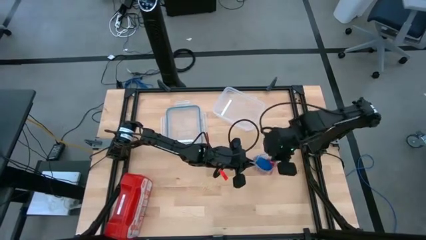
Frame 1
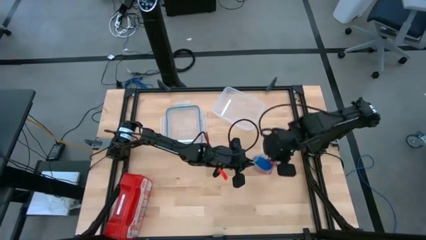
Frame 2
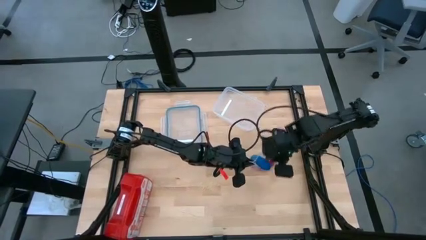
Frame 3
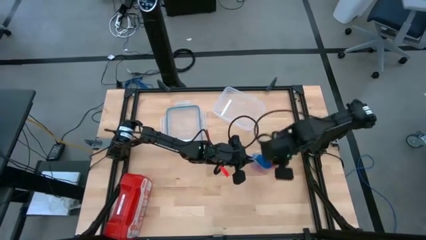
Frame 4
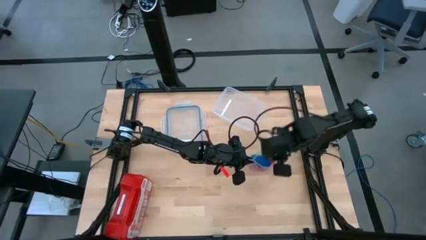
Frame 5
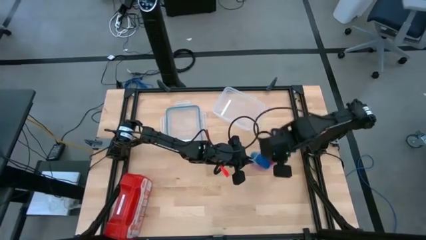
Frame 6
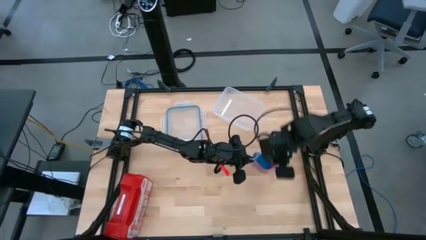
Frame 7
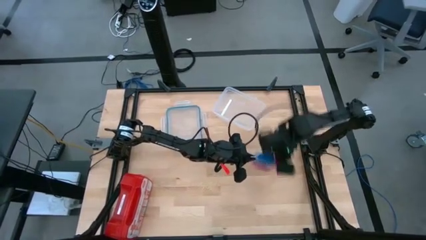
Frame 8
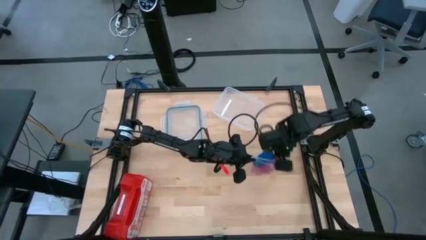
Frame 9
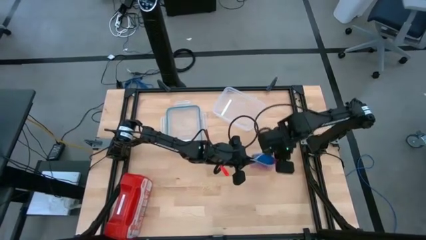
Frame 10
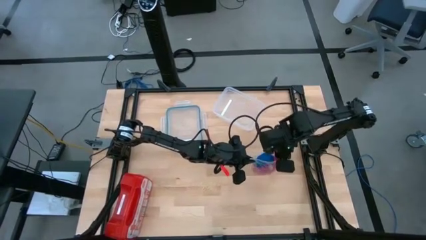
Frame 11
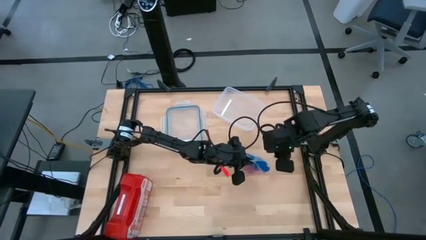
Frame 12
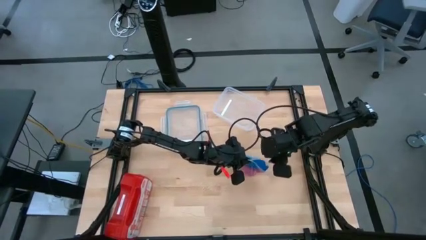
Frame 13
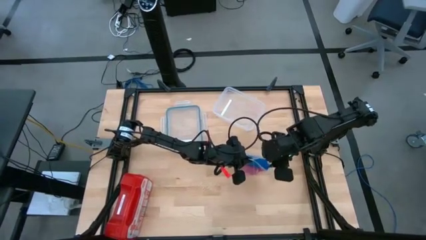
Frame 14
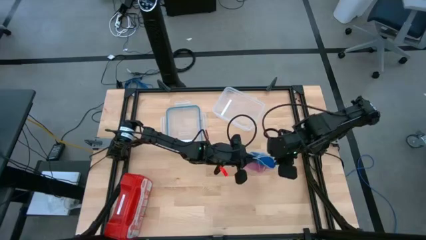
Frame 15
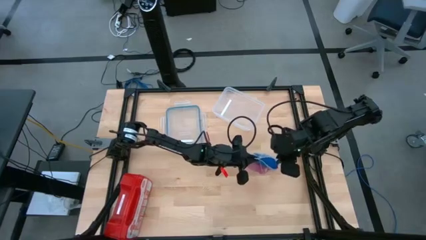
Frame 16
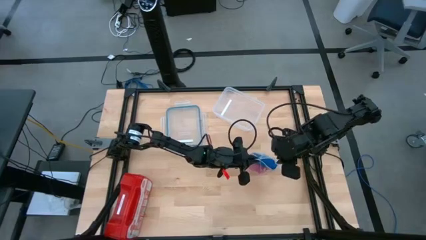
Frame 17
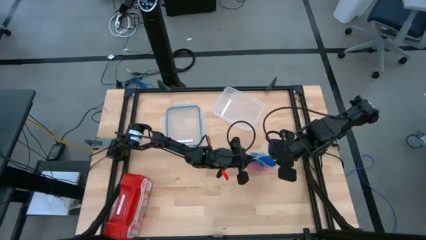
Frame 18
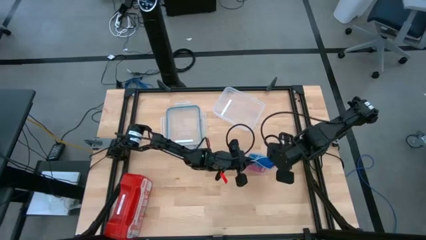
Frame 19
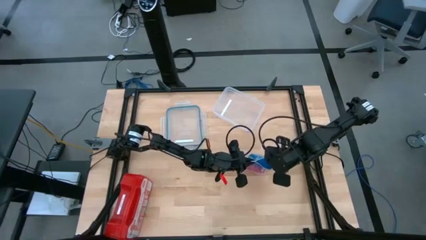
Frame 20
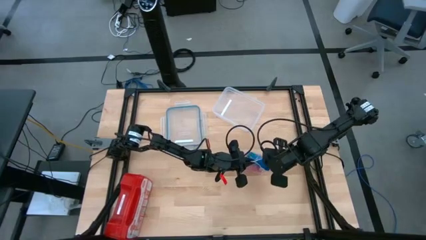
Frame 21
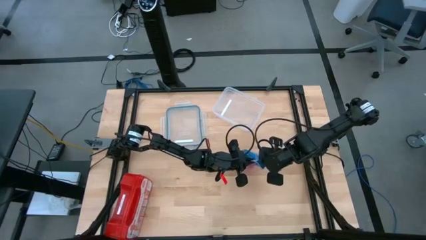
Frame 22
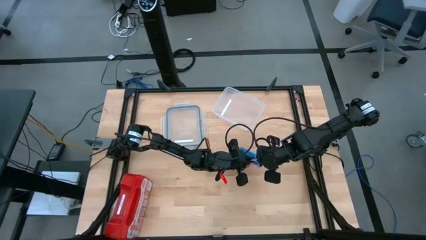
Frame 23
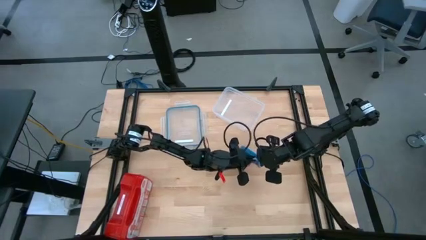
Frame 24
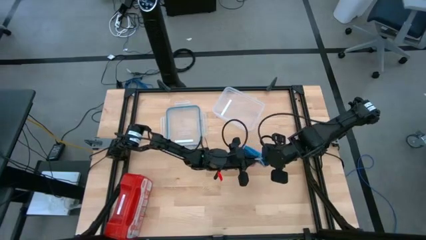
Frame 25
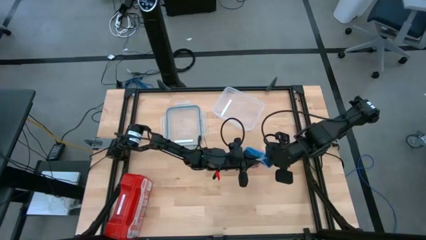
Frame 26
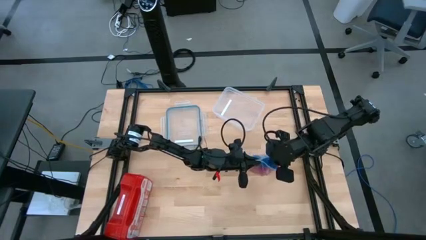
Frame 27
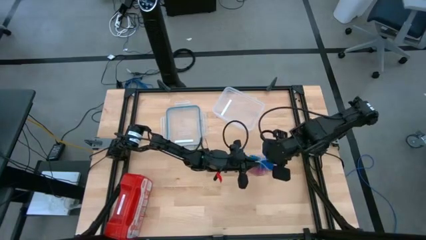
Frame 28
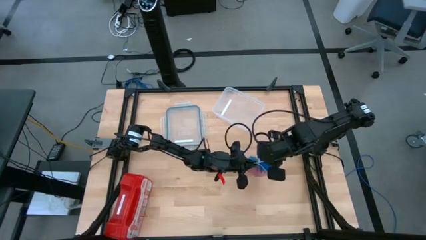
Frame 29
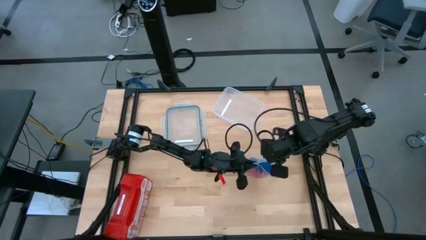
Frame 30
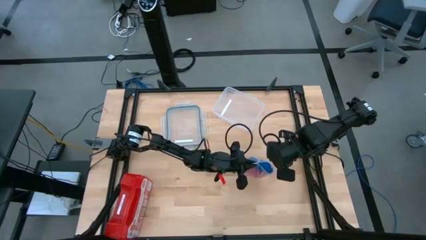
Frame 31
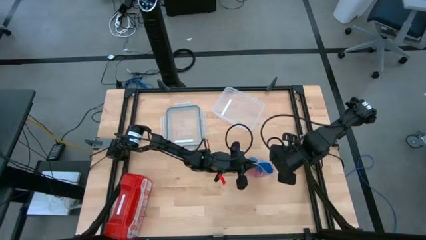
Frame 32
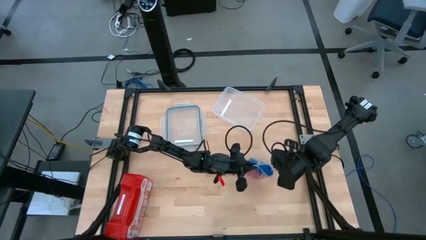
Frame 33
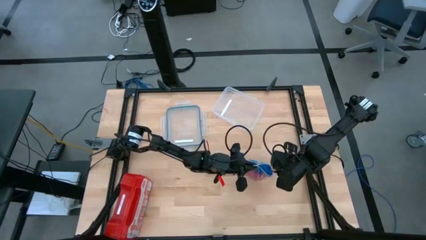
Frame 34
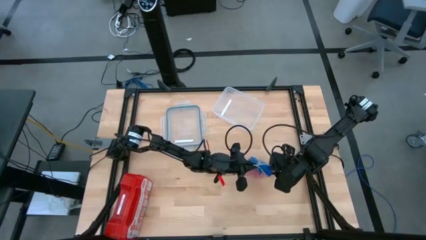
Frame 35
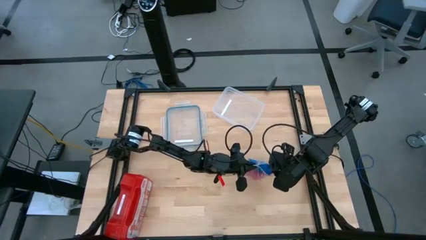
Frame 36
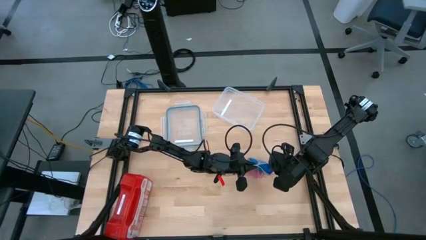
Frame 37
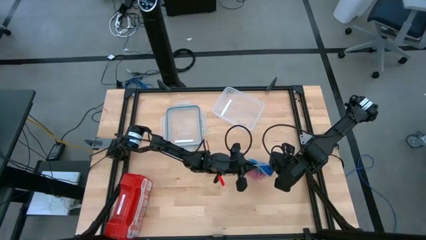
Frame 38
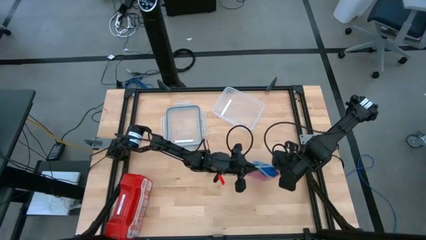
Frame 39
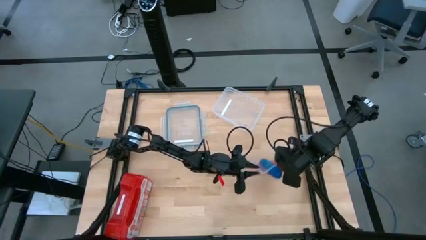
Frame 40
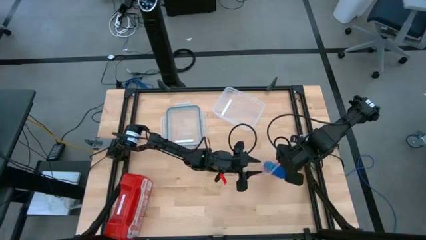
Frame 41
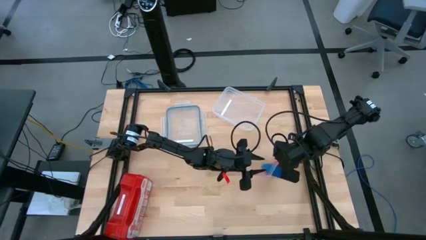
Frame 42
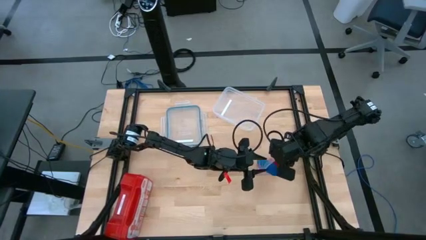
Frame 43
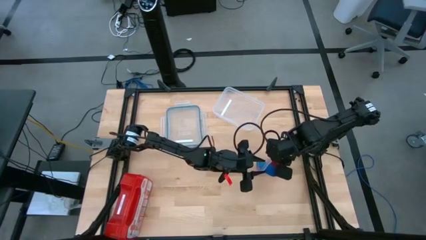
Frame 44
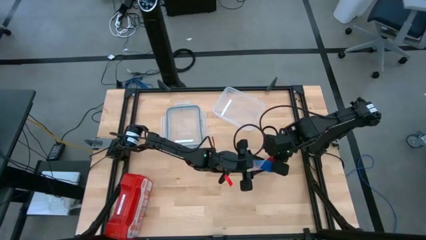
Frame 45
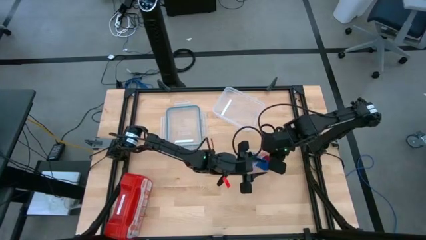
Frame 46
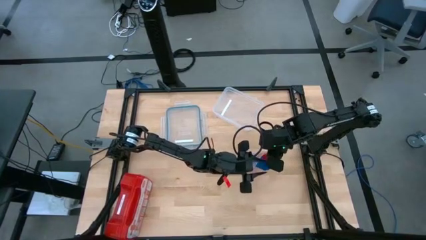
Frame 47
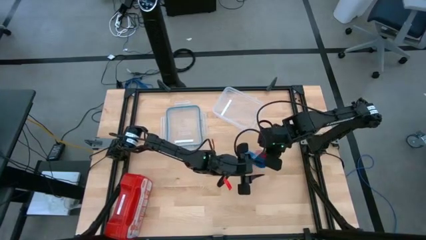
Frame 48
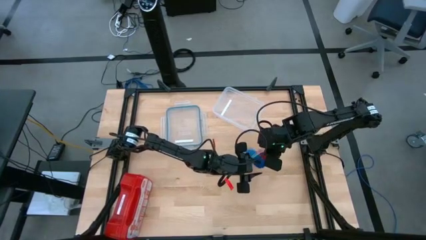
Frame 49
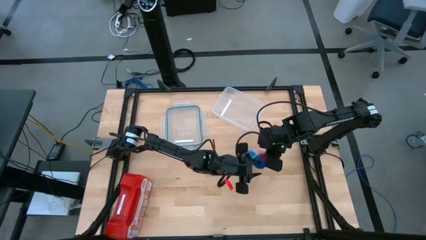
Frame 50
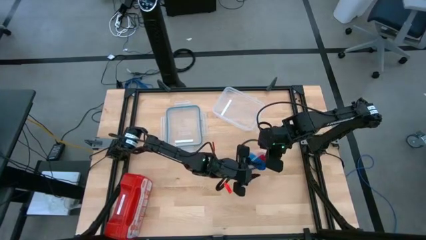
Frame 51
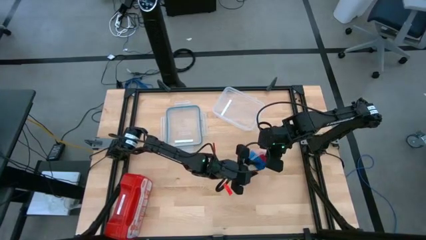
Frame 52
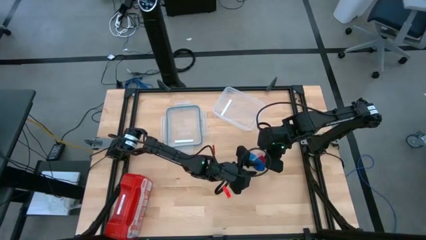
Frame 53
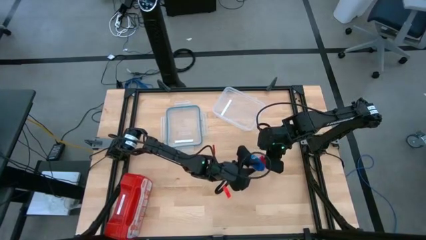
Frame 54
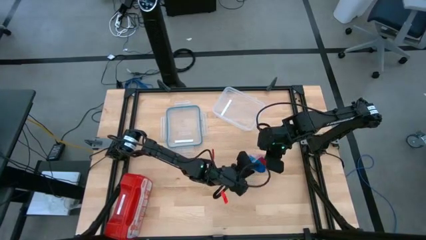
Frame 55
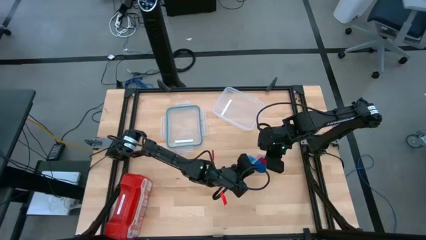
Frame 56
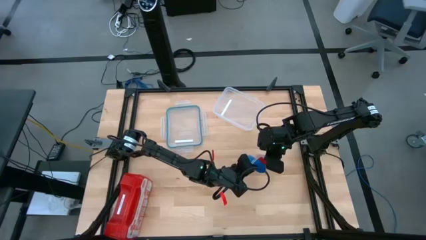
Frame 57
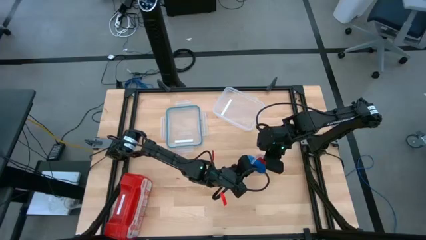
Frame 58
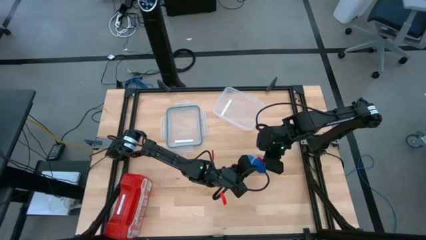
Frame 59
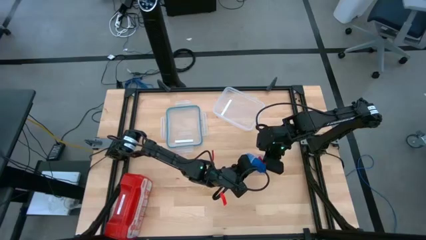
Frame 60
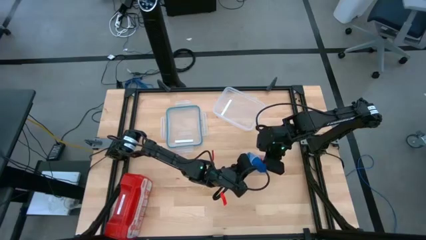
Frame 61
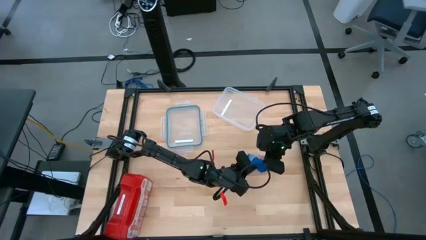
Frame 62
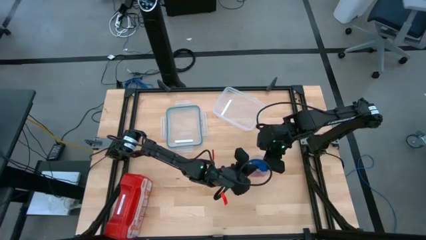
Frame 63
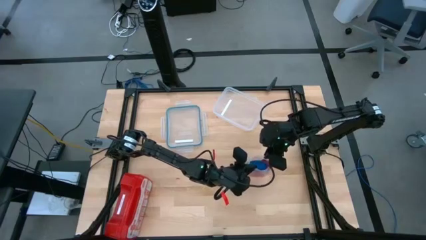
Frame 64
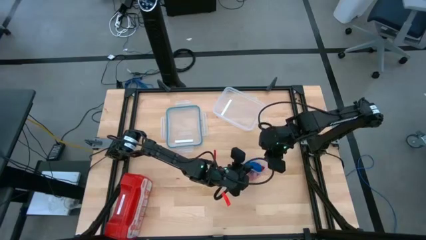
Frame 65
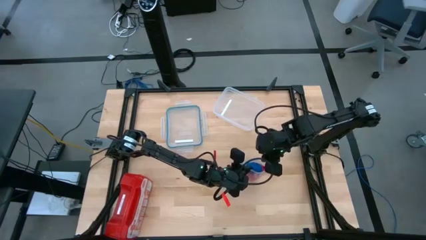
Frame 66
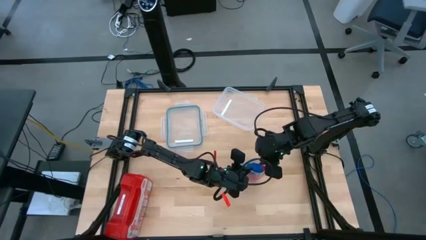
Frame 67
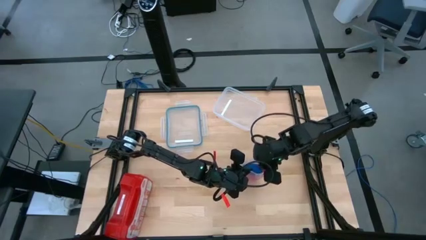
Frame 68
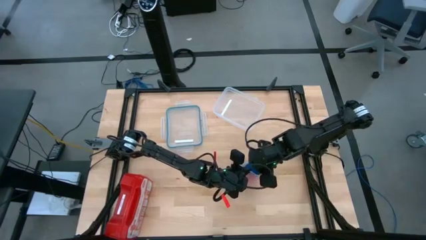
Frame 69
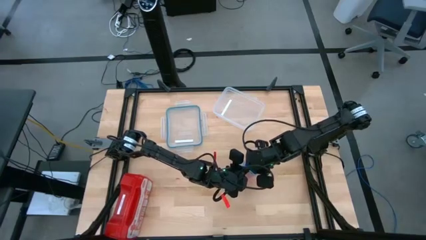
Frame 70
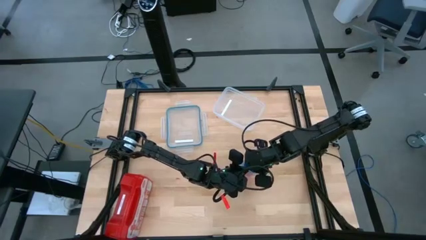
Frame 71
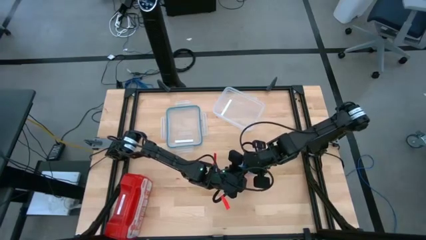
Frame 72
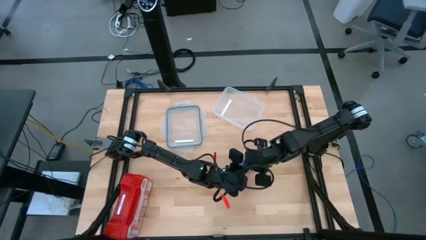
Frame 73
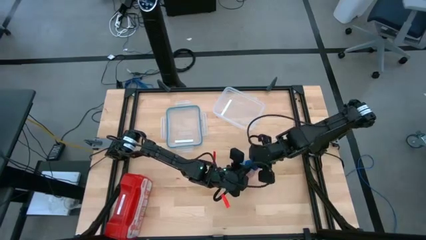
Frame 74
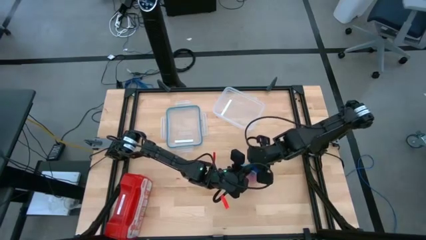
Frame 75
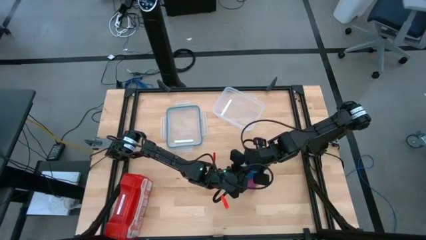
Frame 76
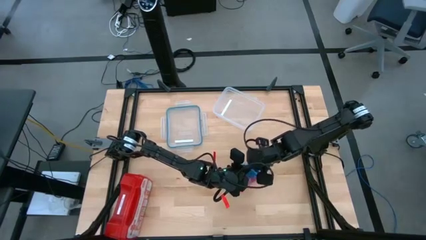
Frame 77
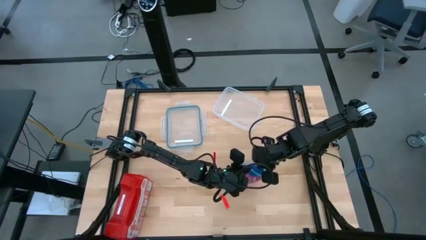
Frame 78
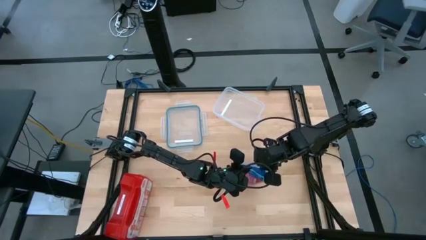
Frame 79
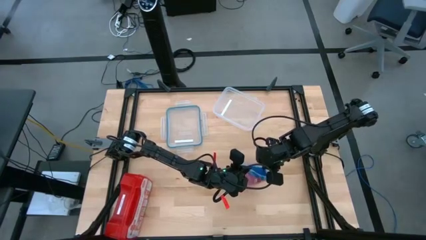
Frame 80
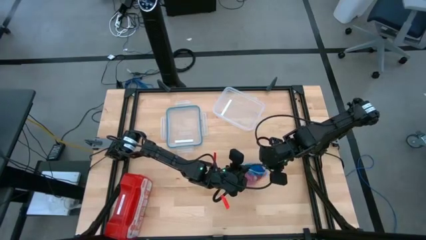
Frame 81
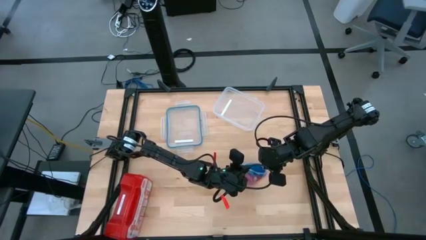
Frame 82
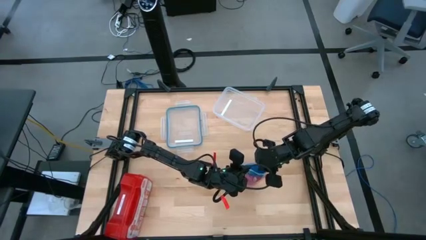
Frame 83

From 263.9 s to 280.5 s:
Task: Roll bandage
Put the blue bandage into the transparent zip bag
